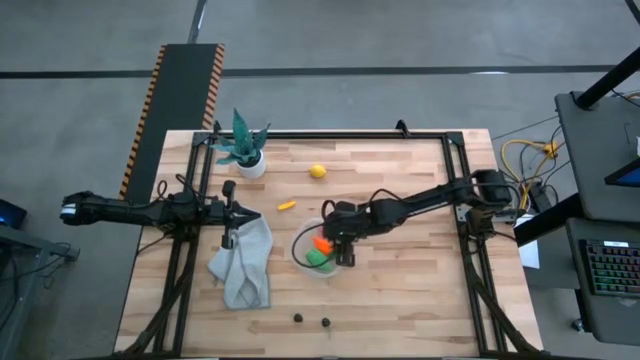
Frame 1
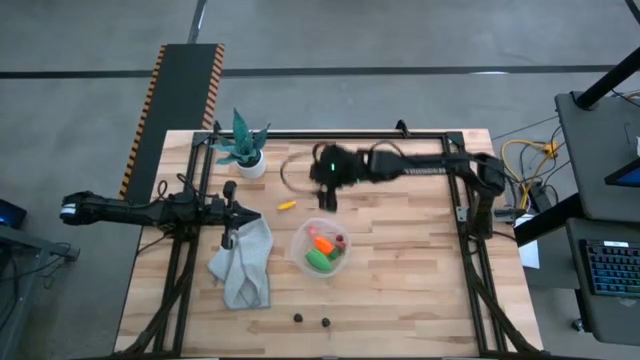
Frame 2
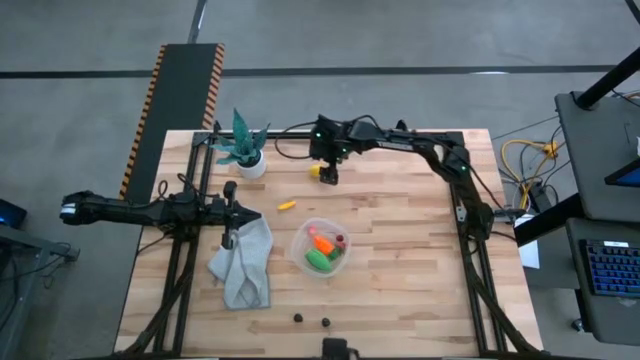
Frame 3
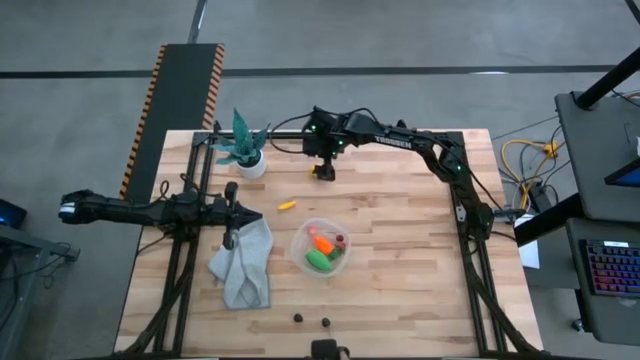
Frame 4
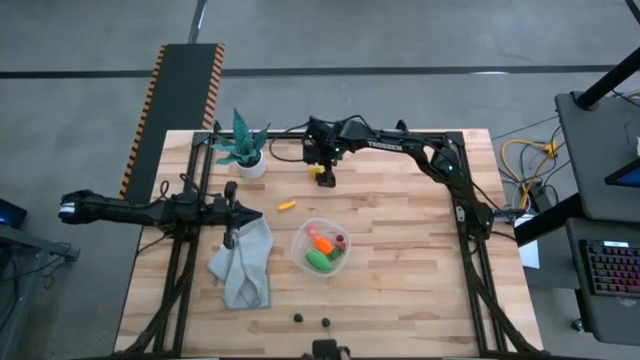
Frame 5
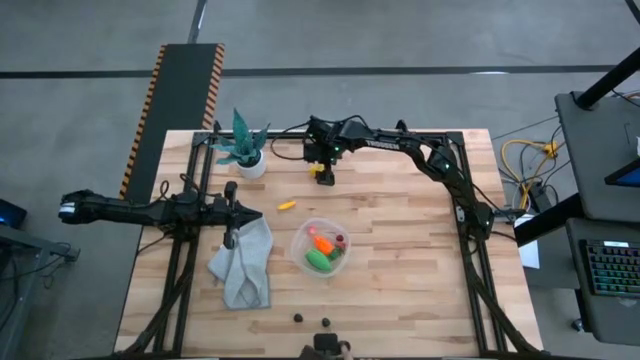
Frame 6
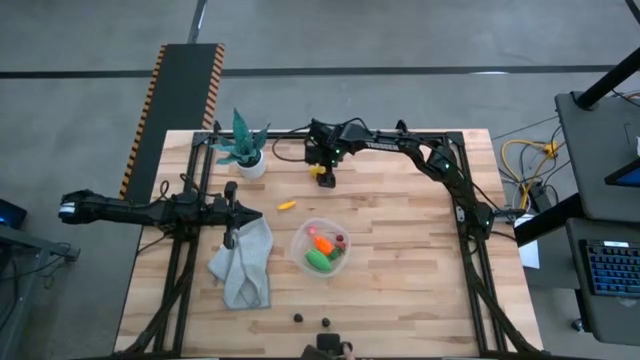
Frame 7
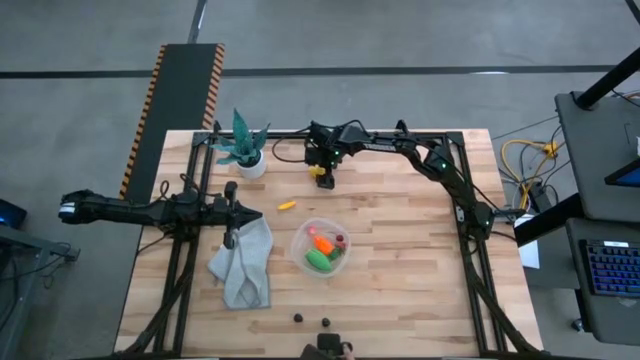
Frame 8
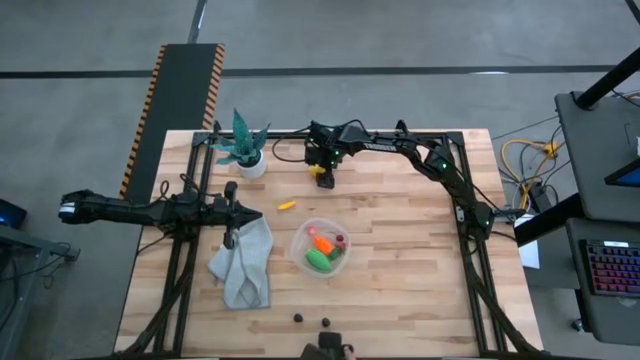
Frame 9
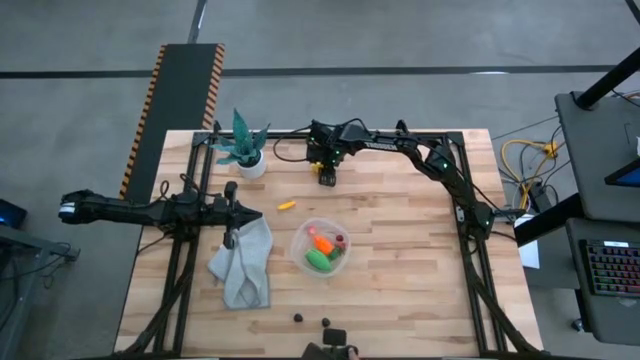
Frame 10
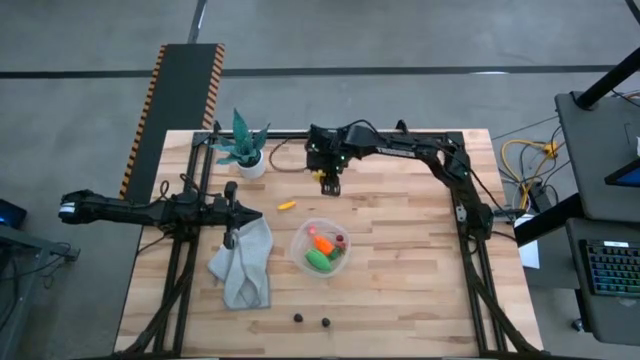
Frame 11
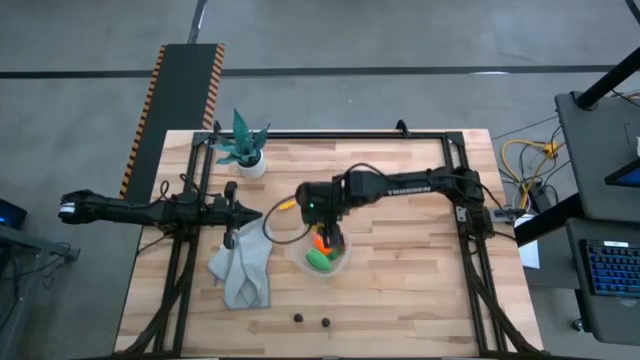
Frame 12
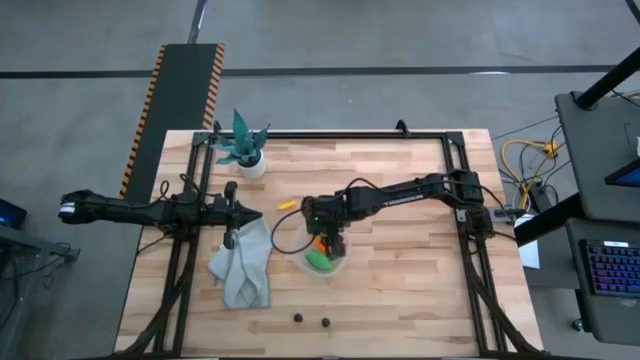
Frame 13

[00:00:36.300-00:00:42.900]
Task: Pick and placing Produce into tupperware
Put the yellow lemon into the transparent bin

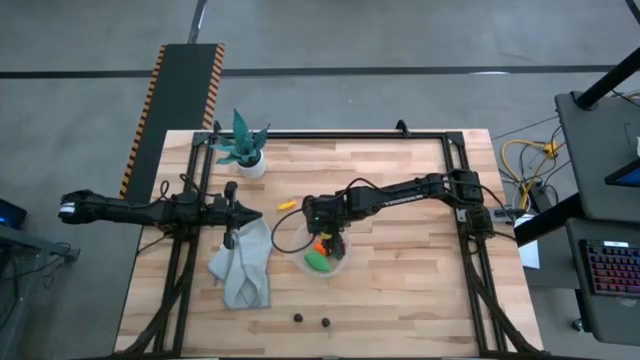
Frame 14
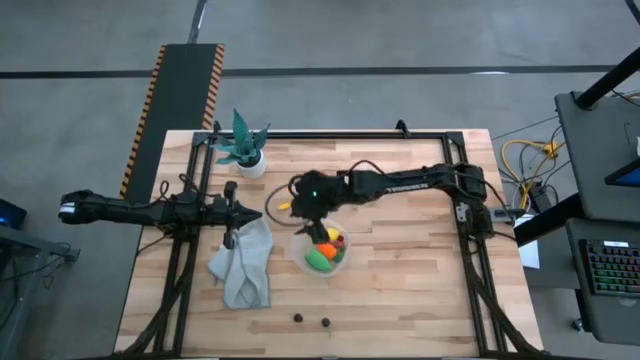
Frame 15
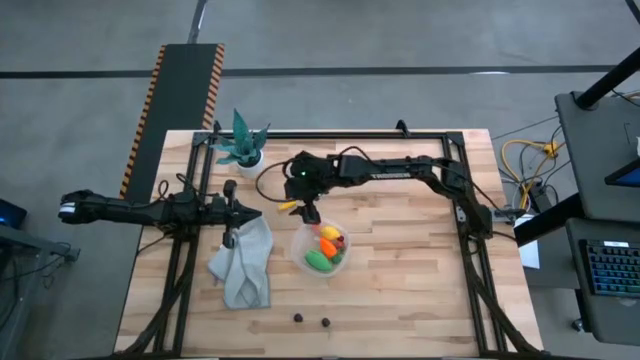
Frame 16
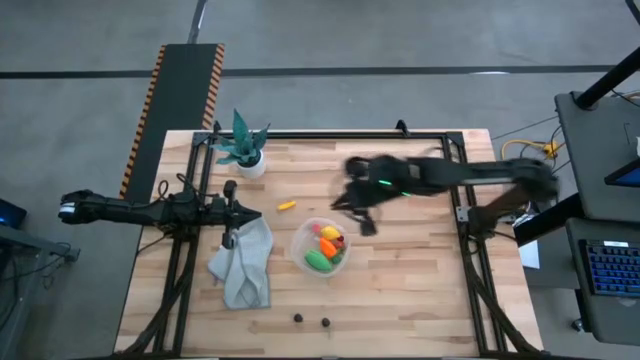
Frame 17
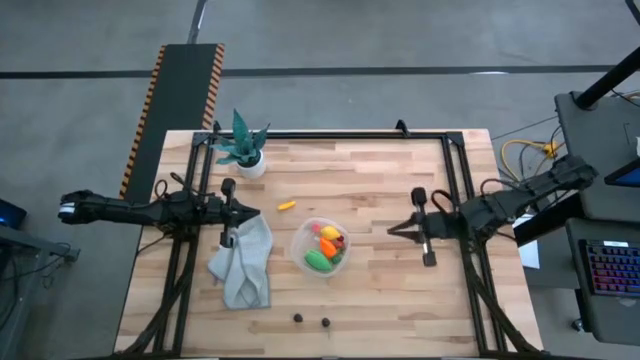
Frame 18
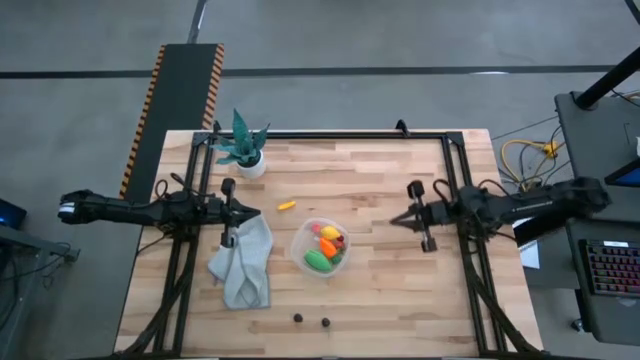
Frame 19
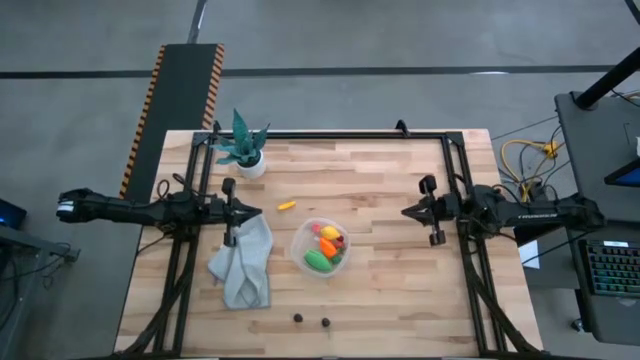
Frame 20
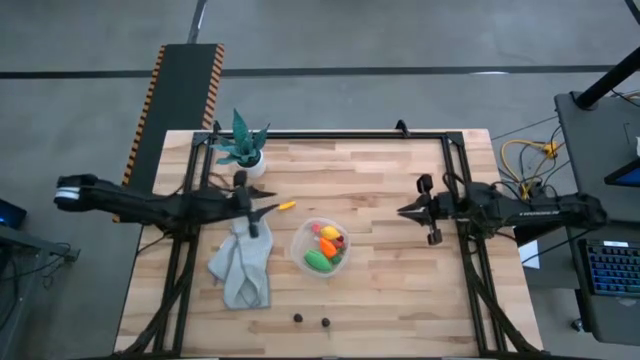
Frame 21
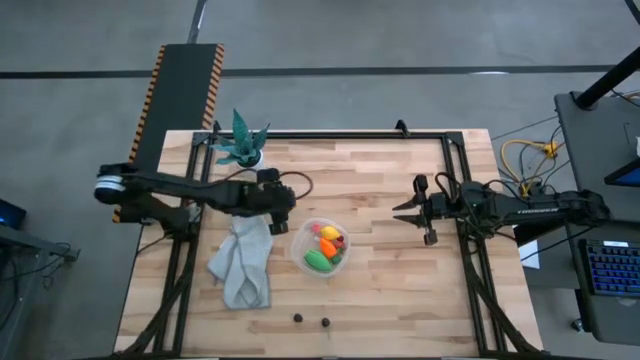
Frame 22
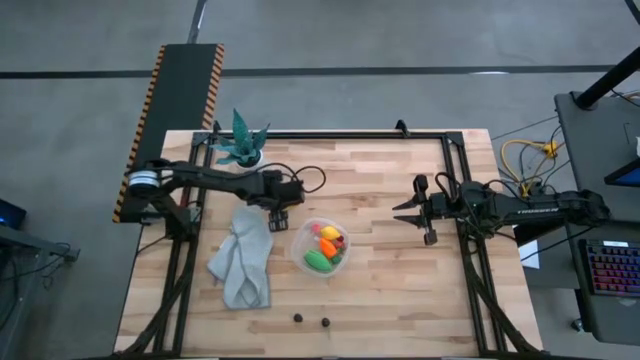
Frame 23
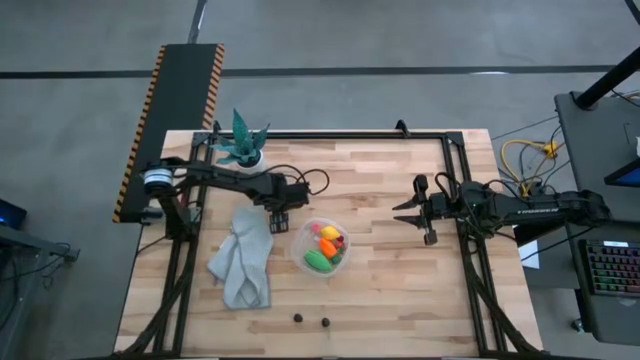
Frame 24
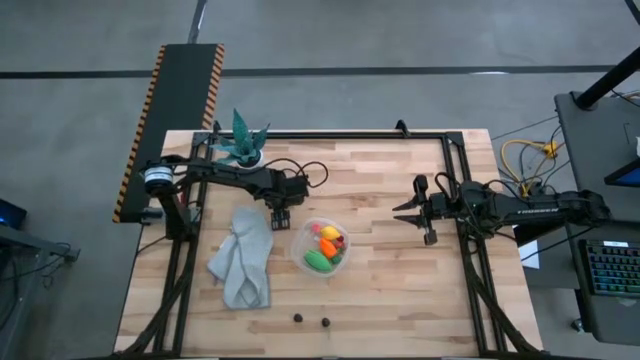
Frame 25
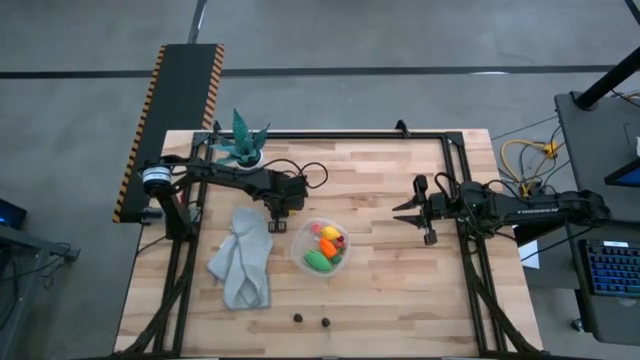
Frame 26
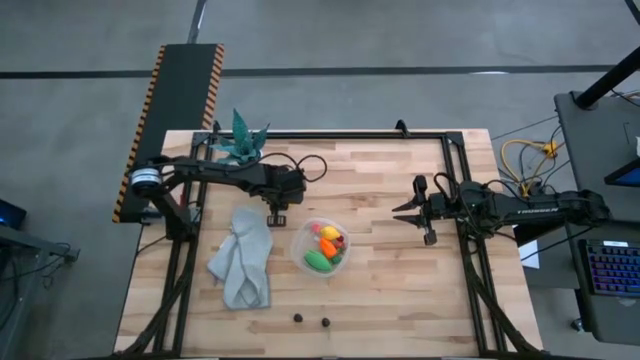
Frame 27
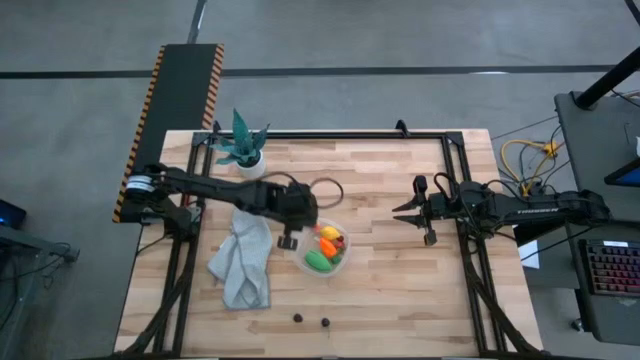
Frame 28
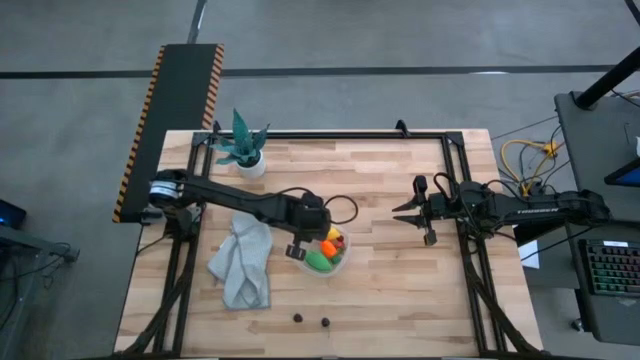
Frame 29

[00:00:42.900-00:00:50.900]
Put the yellow corn into the transparent bin

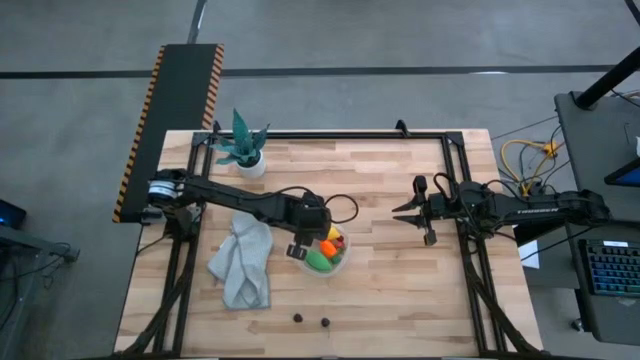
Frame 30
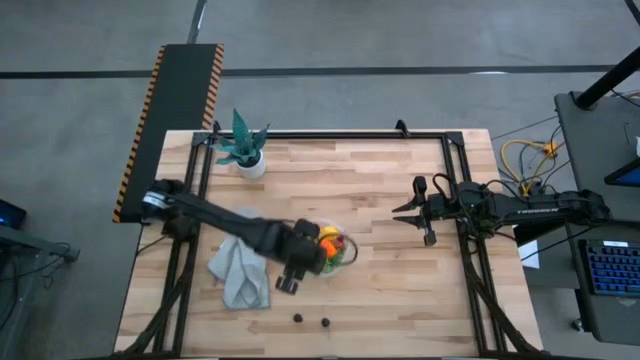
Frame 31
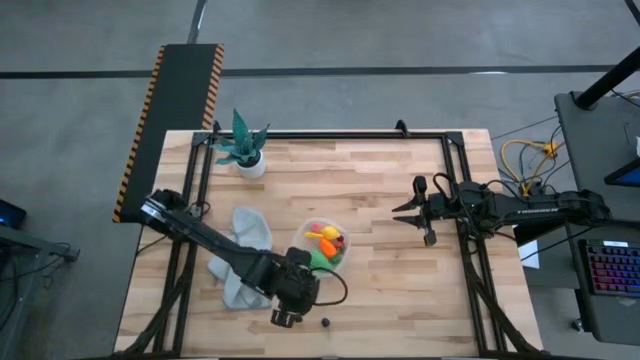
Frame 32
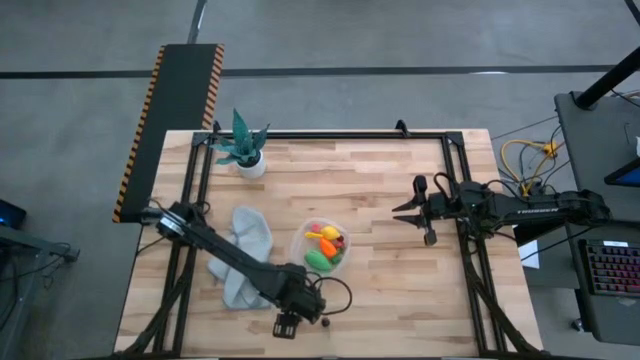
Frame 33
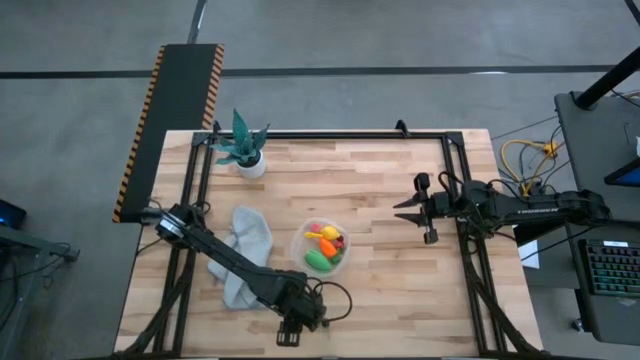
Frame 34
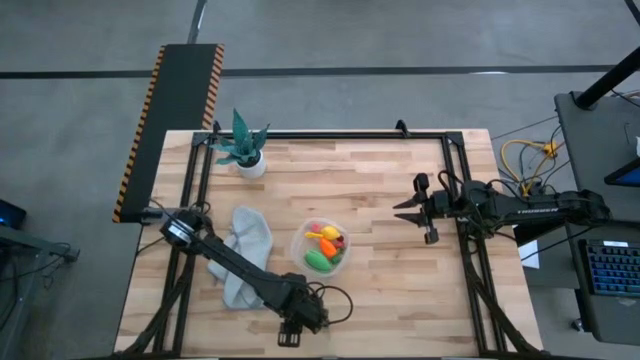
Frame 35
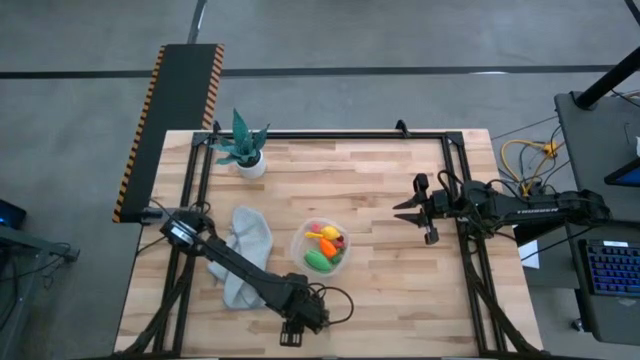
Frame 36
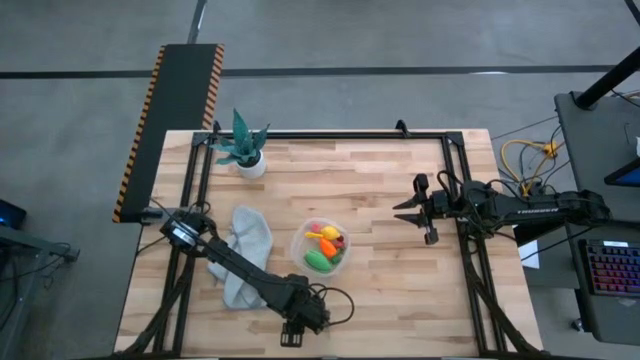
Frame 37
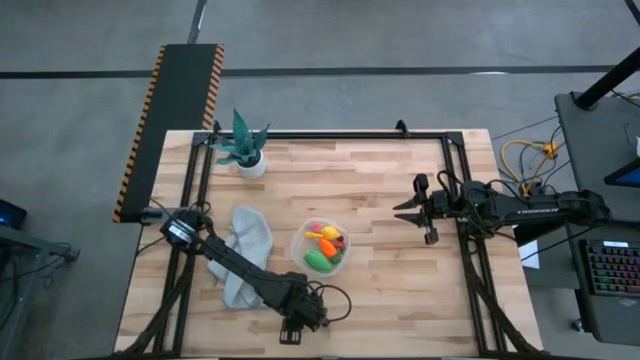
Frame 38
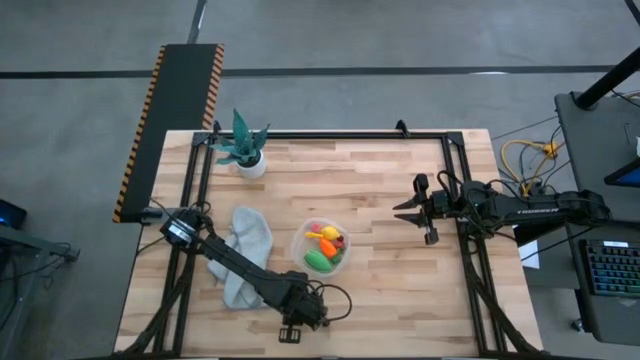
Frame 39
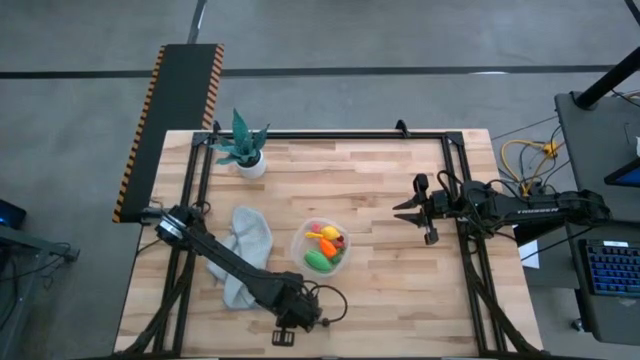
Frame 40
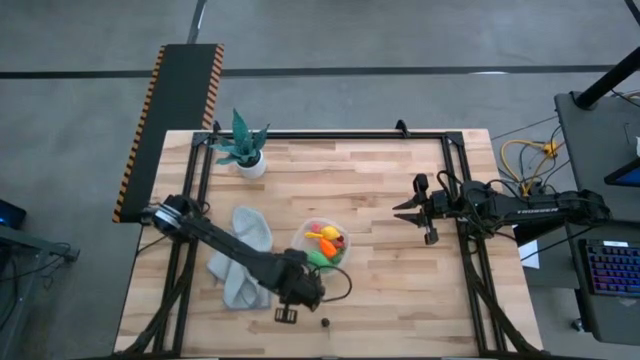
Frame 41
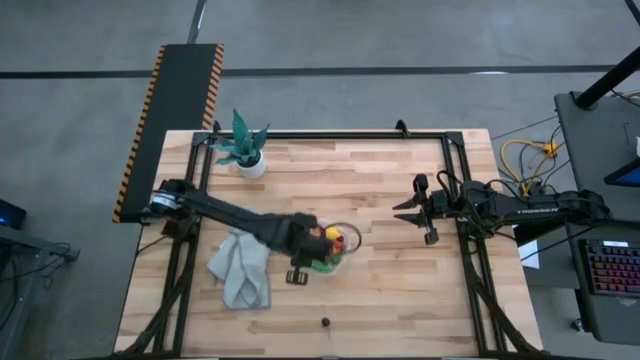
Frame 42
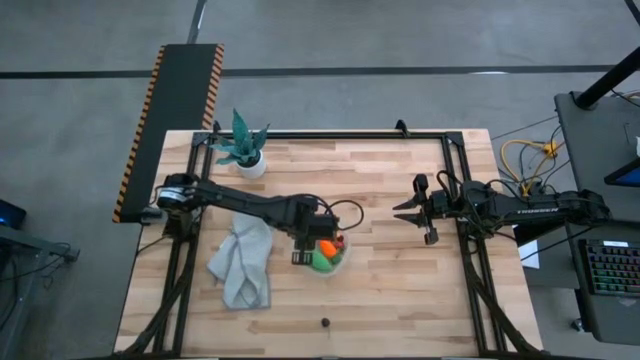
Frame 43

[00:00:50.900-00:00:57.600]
Put the blackberry into the transparent bin
